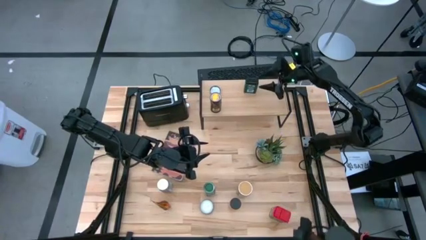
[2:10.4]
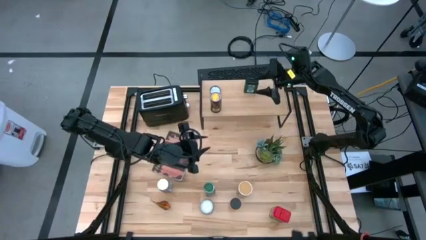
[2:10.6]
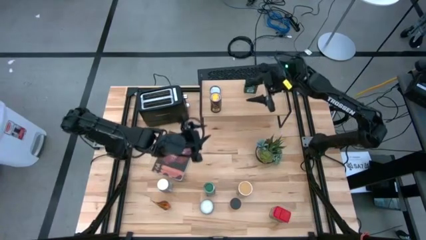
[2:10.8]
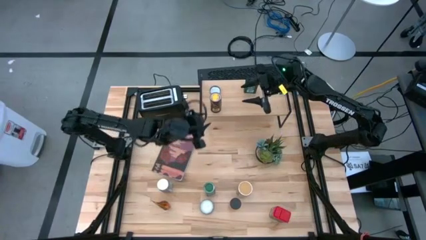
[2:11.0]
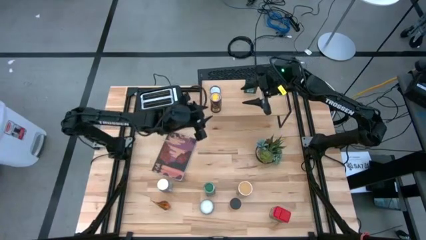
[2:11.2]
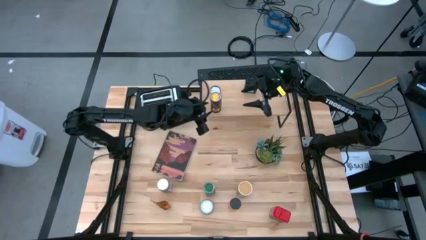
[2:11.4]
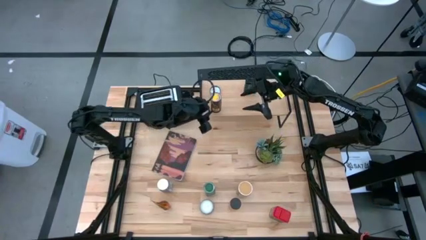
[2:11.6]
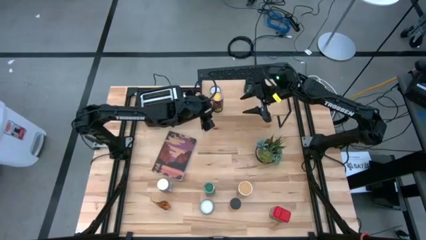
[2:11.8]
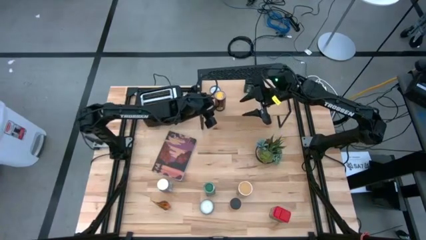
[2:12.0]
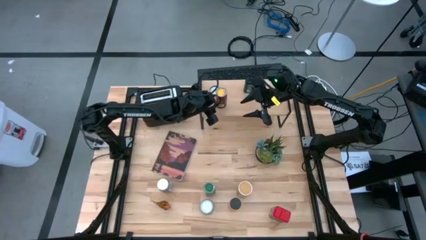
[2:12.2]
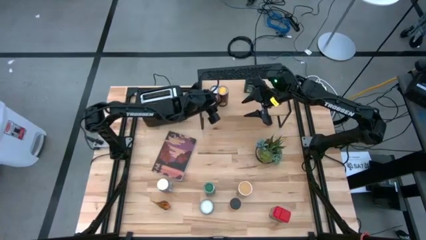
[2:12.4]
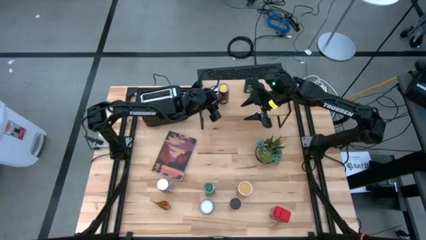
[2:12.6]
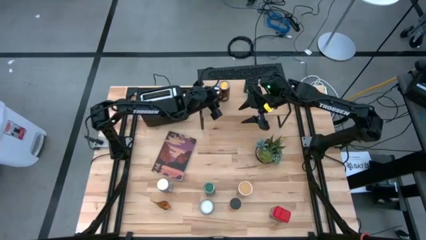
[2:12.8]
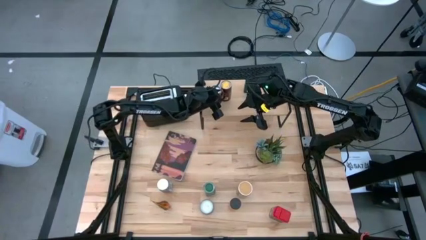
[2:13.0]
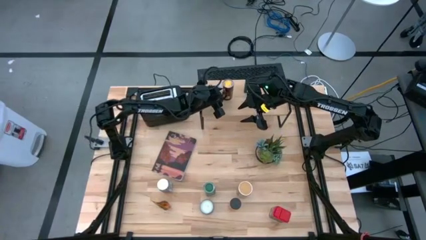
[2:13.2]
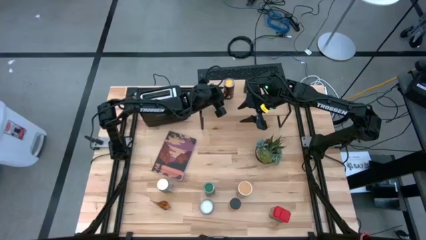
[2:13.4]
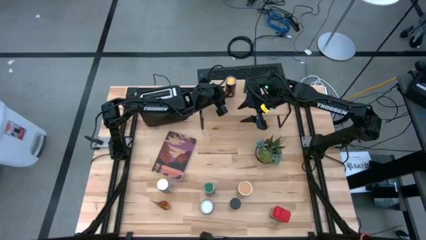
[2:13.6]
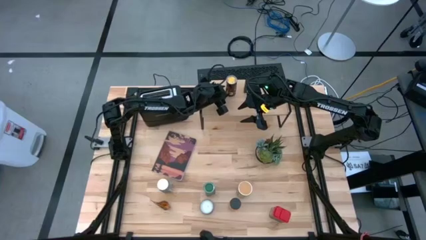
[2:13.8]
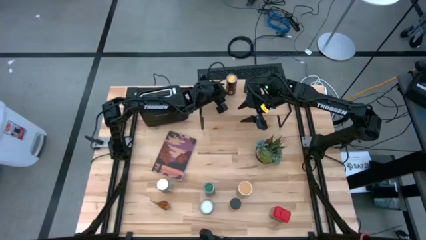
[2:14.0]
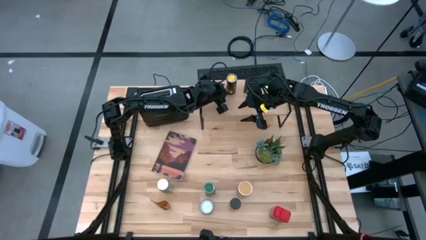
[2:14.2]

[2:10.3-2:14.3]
Task: Shelf spices
Adjust the yellow seasoning bottle on the shelf

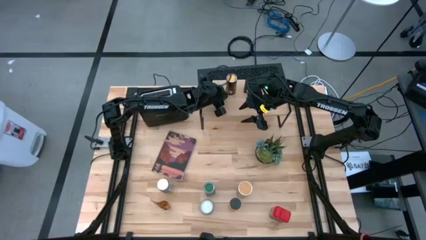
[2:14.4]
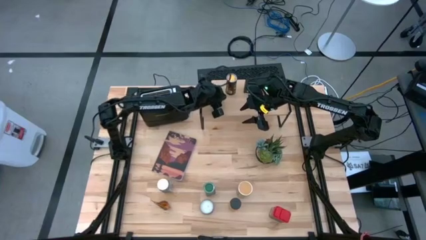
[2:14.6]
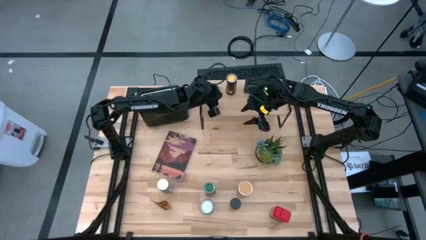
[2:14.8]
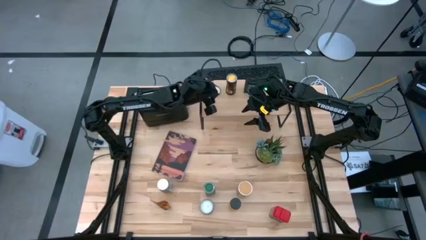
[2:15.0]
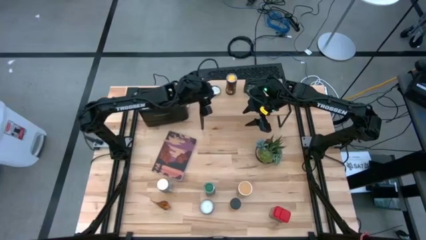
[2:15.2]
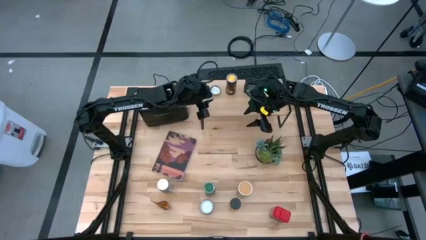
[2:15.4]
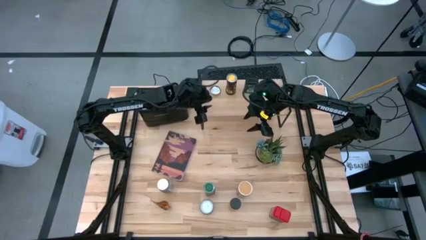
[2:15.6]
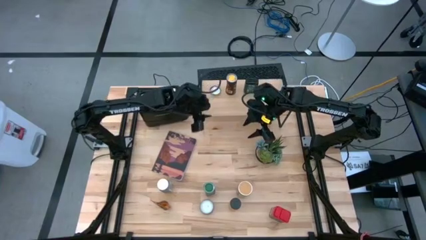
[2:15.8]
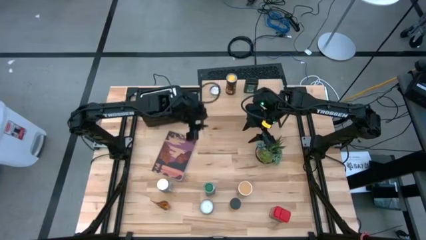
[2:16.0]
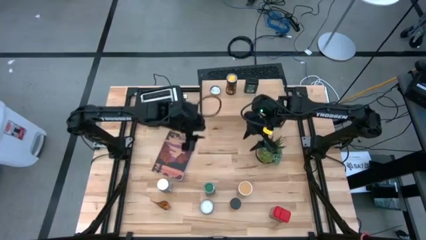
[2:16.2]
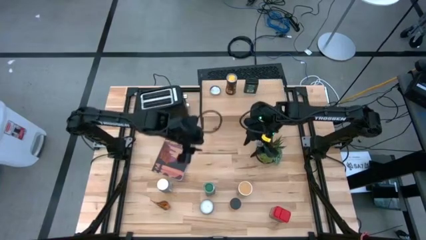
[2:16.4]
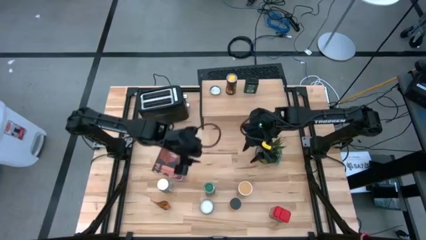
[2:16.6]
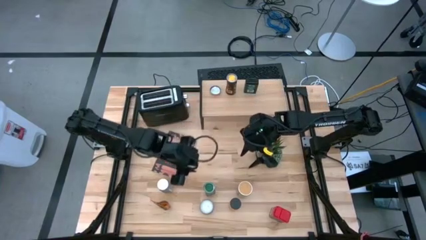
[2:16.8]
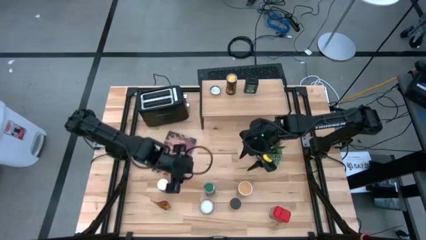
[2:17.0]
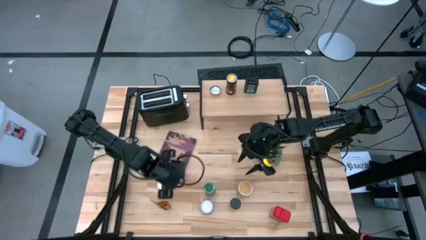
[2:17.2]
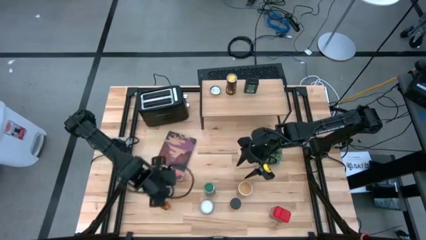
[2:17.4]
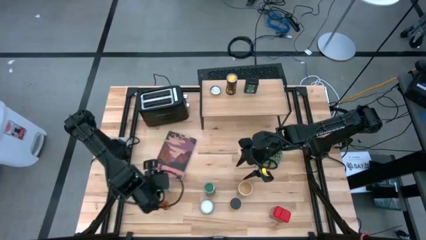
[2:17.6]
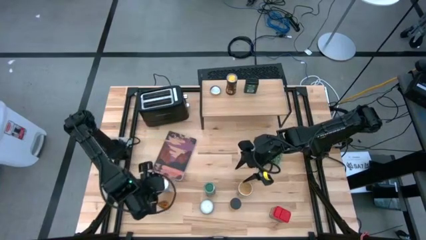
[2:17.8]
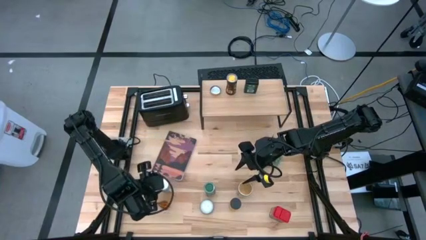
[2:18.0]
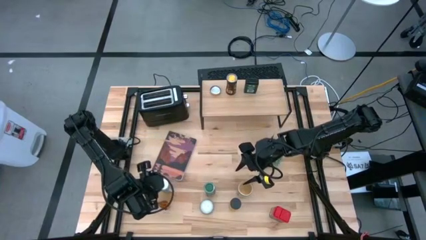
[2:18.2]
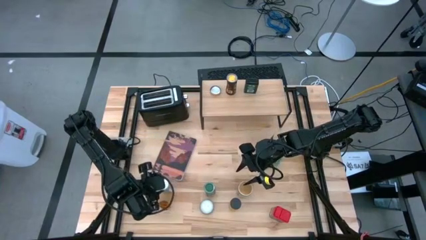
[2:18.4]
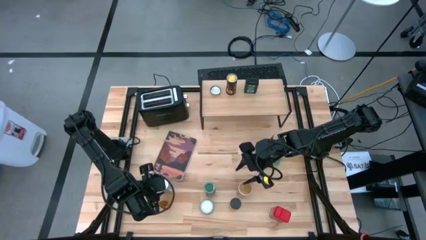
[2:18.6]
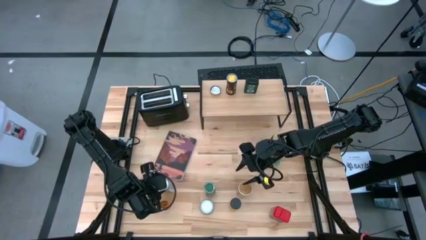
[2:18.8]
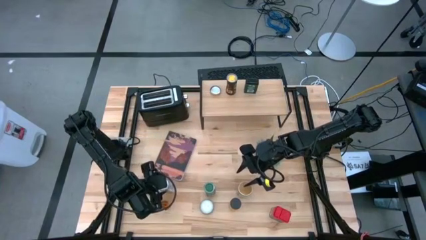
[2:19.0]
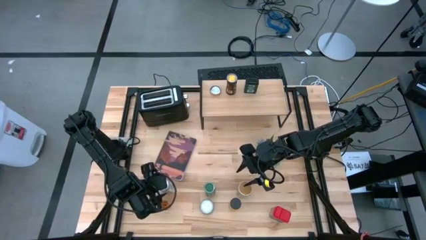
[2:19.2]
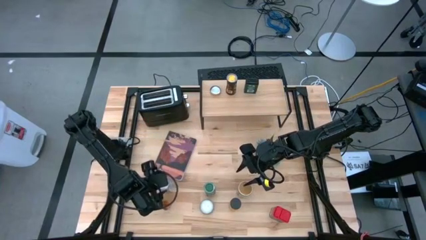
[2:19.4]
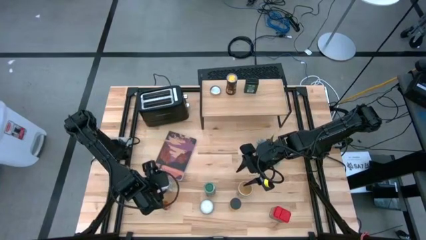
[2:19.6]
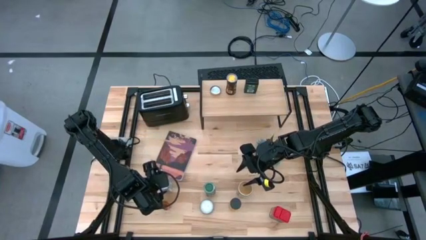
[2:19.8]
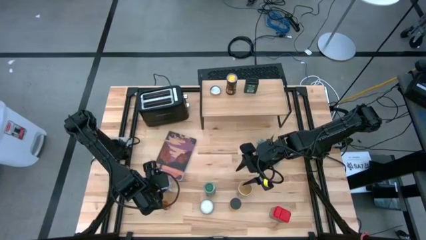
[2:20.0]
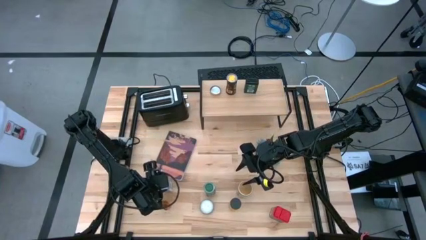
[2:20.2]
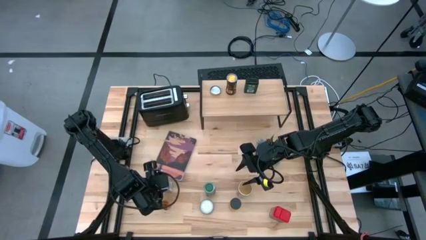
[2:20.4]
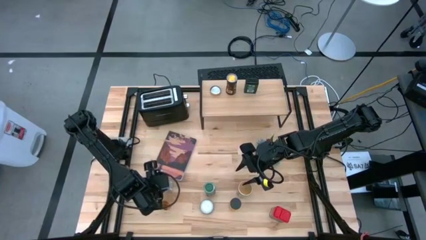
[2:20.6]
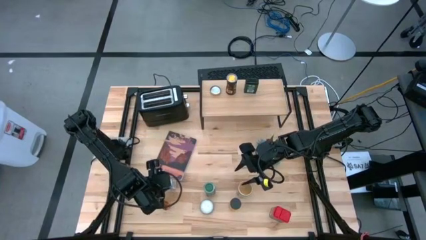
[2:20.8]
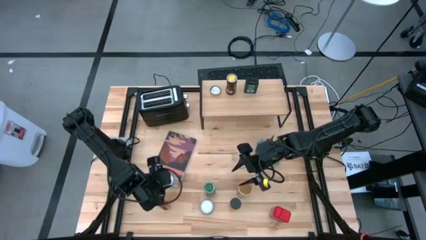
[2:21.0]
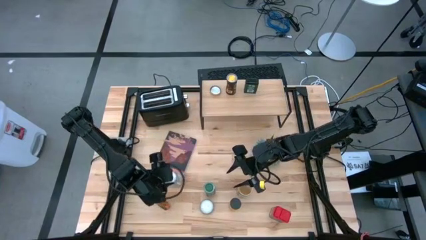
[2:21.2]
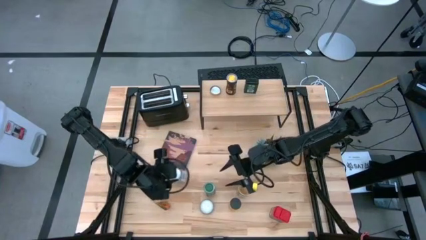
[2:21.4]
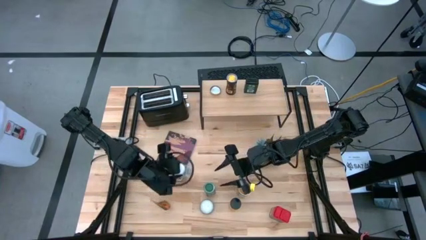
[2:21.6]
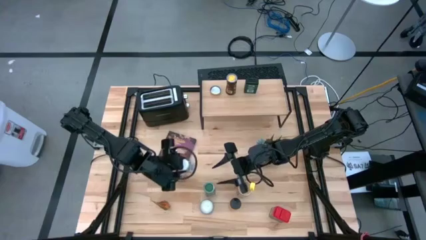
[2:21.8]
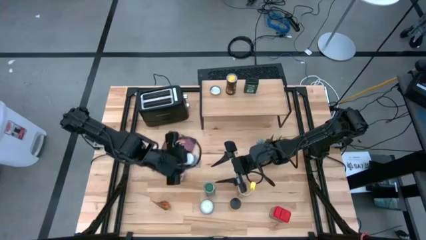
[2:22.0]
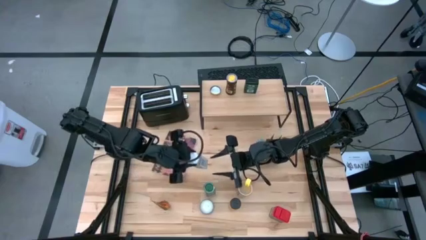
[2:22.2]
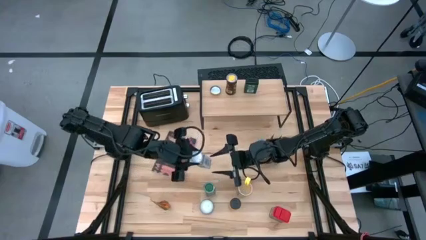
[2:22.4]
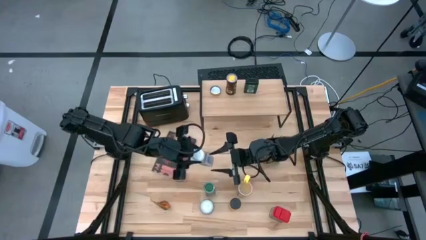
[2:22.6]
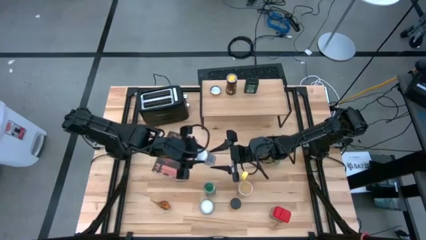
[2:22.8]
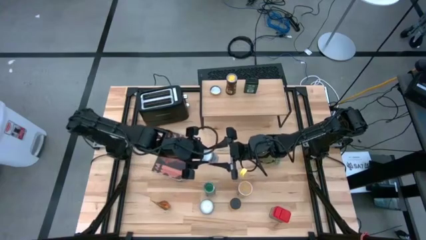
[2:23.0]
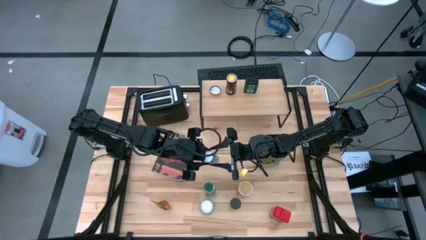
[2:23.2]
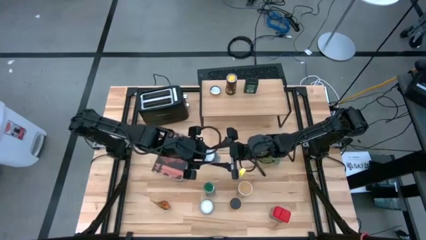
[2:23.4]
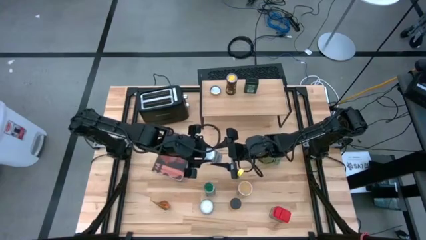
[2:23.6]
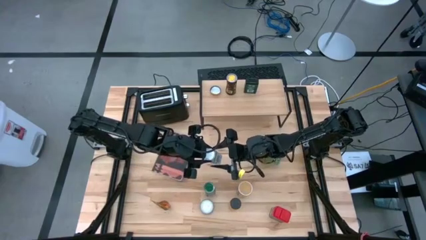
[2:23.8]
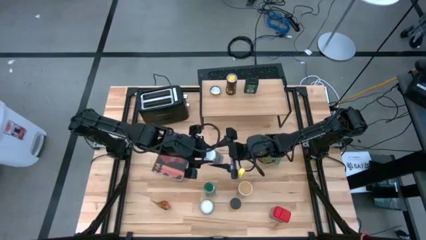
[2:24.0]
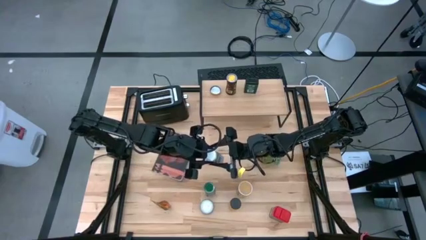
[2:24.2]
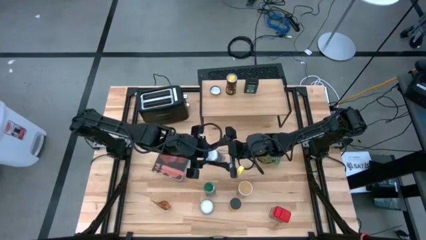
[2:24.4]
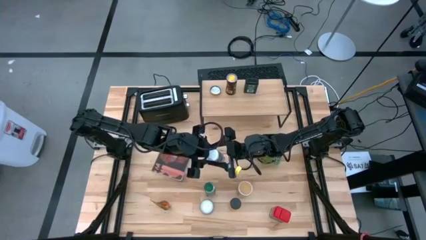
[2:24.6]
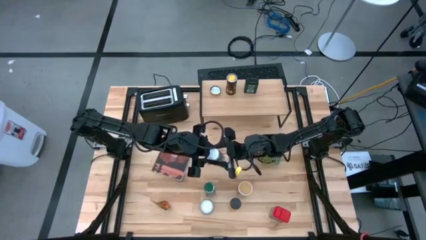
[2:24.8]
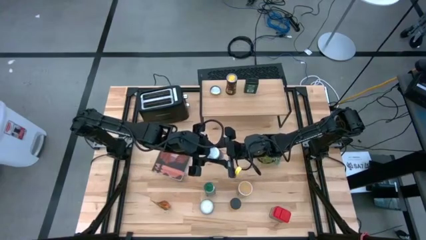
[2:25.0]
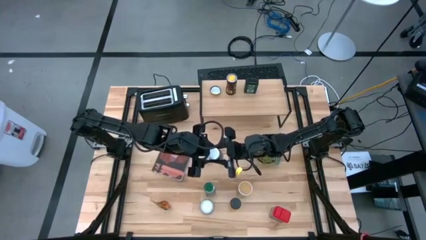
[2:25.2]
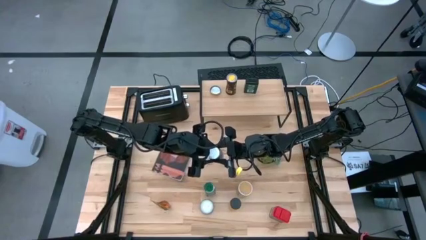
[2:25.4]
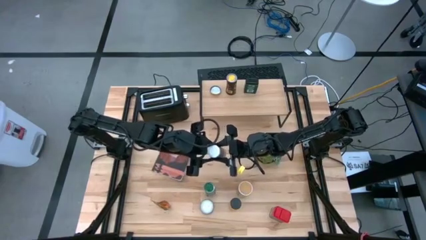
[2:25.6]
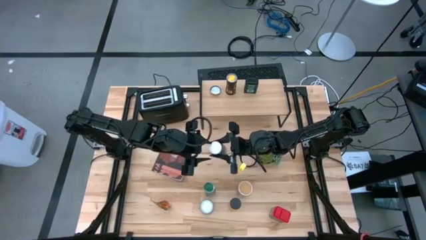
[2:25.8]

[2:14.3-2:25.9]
Put the white seasoning bottle on the shelf
